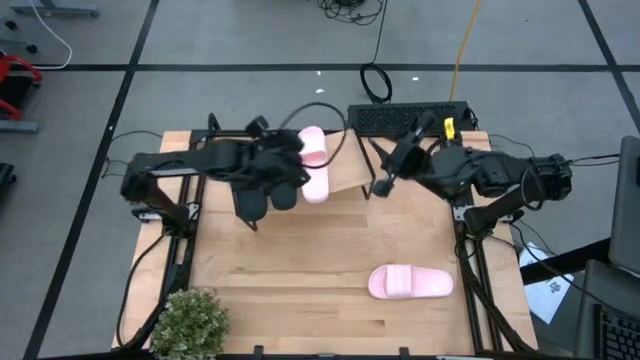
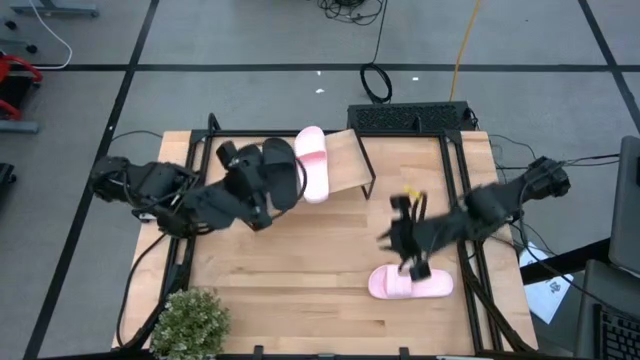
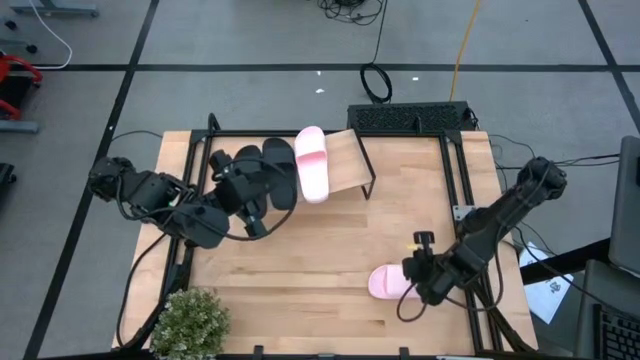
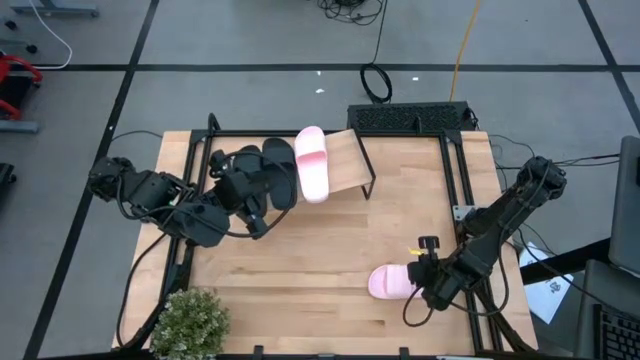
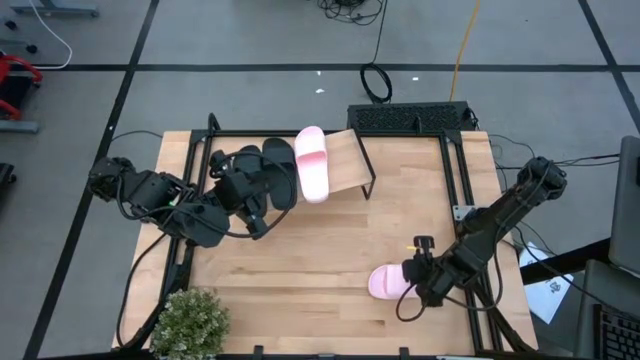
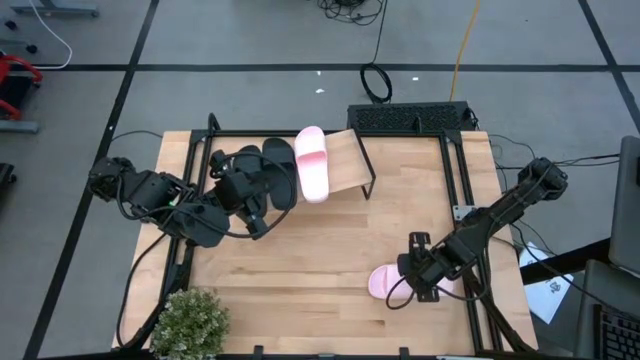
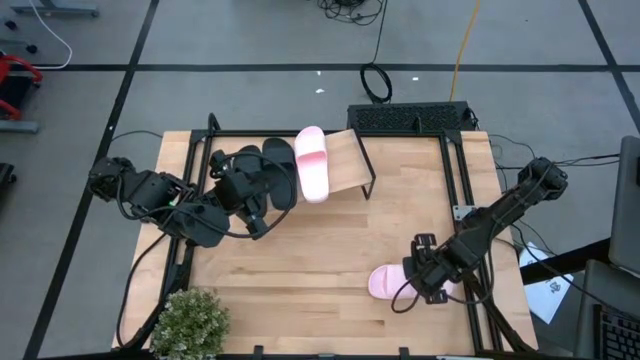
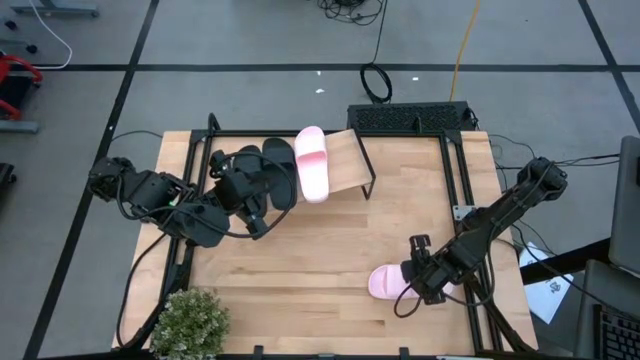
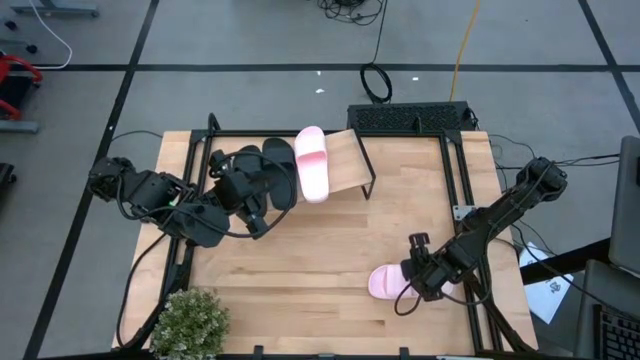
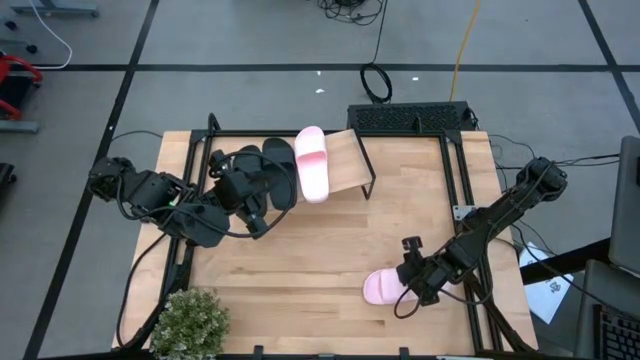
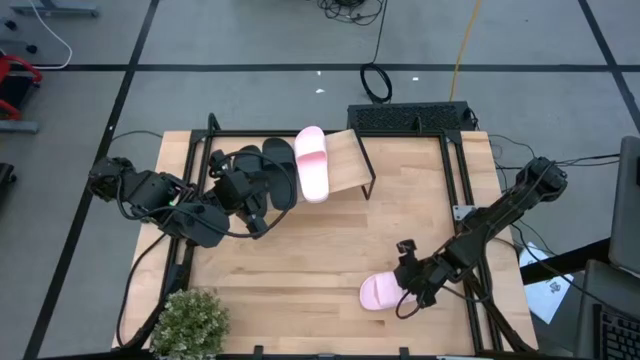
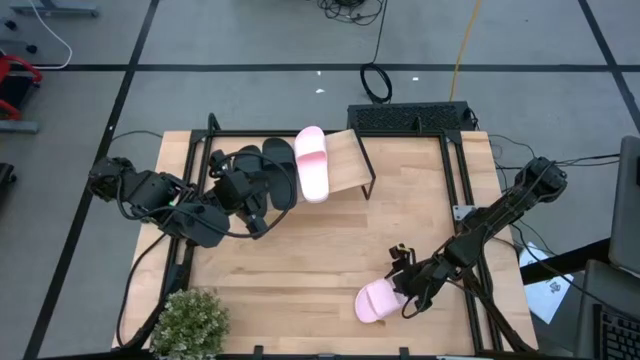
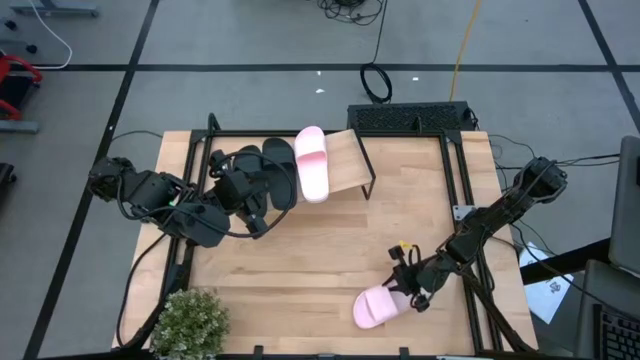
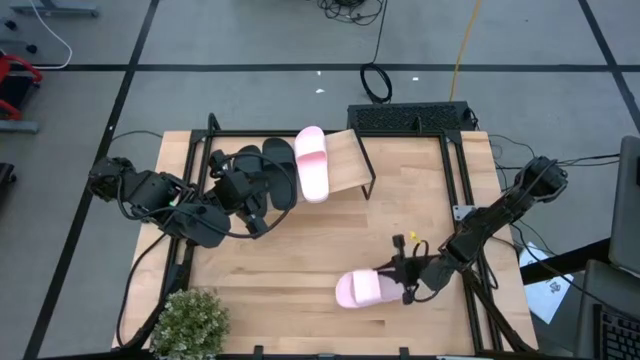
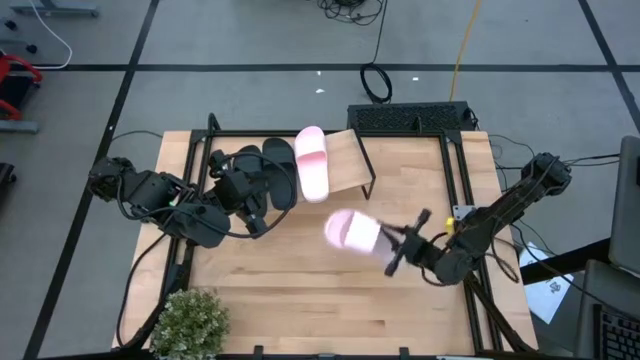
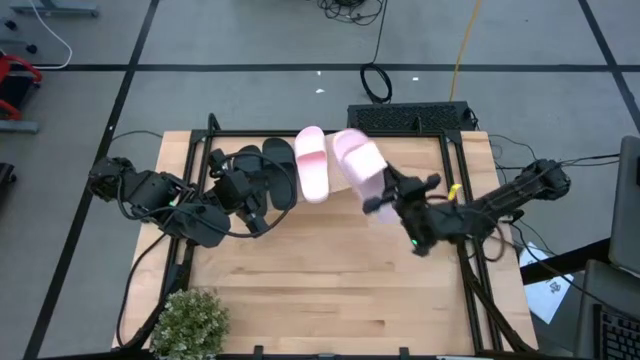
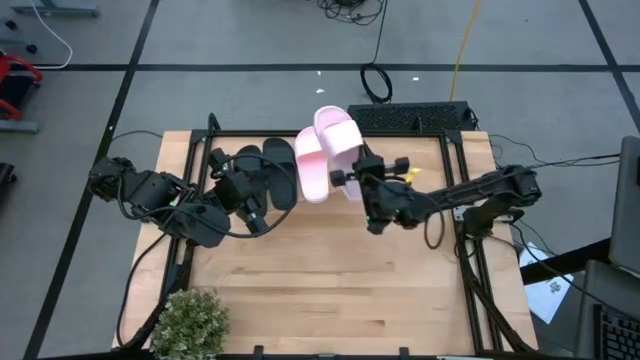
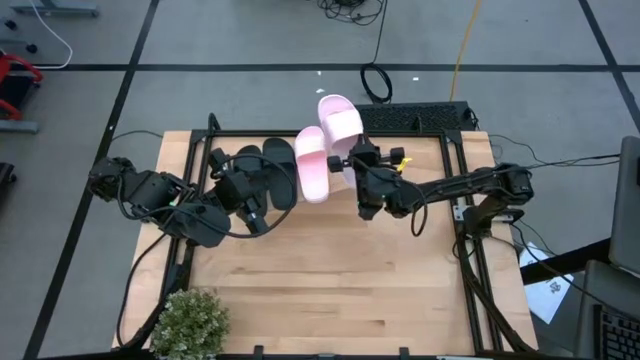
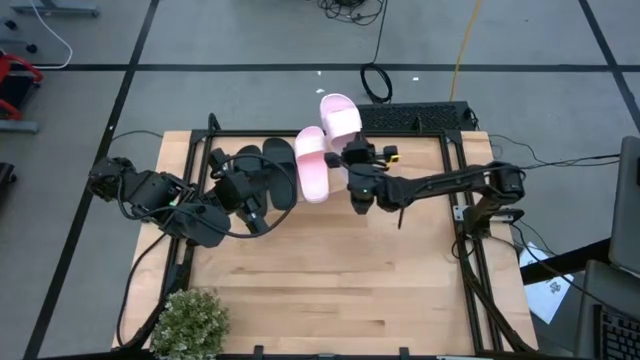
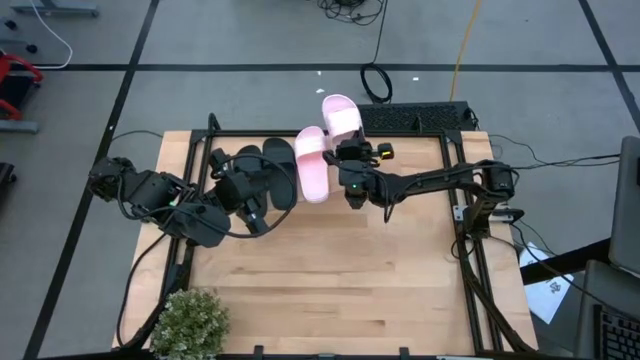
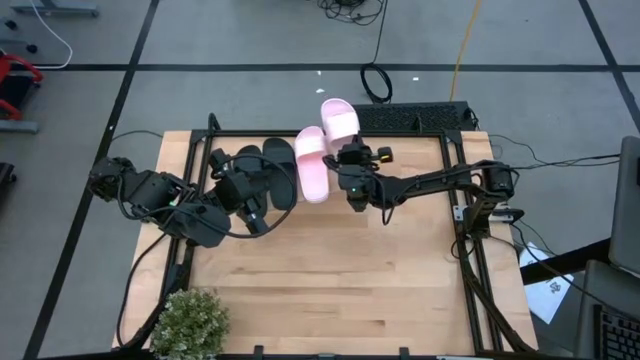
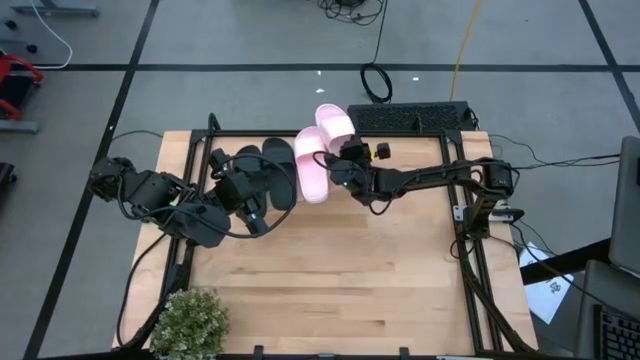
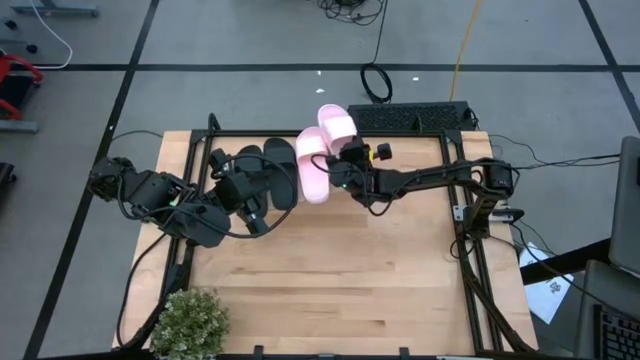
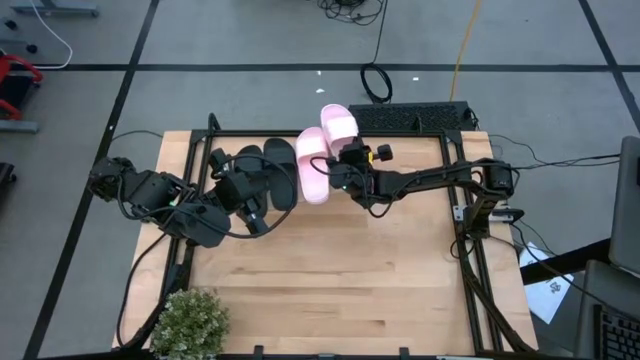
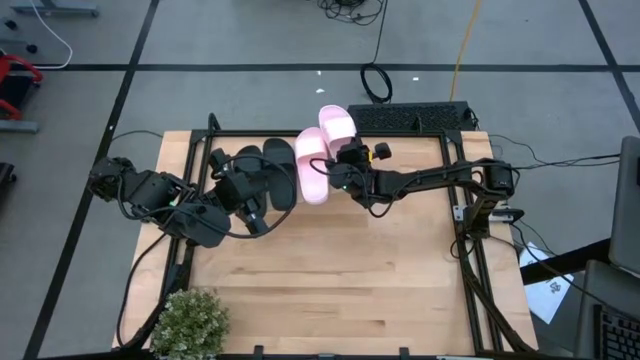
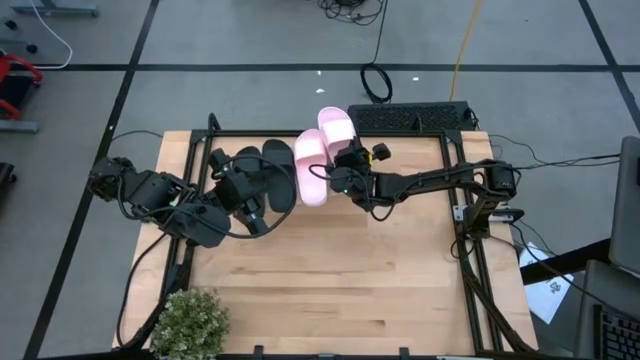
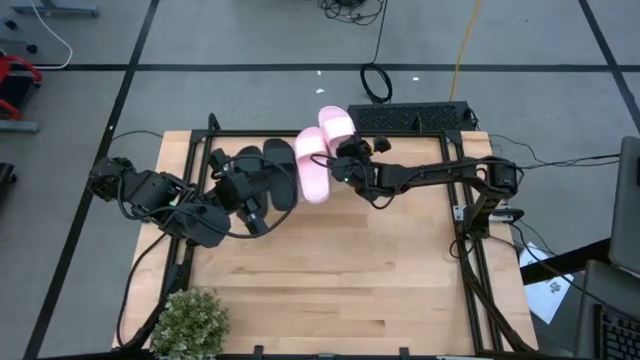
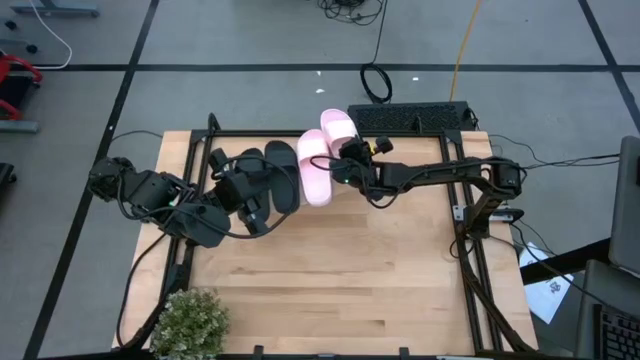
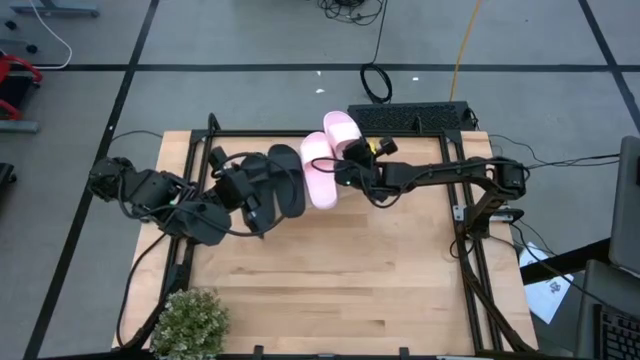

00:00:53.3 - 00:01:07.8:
Task: Pick and place slides into the shelf
Put the pink slide on the shelf
